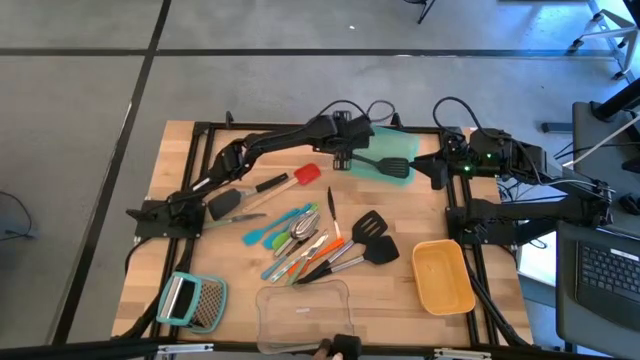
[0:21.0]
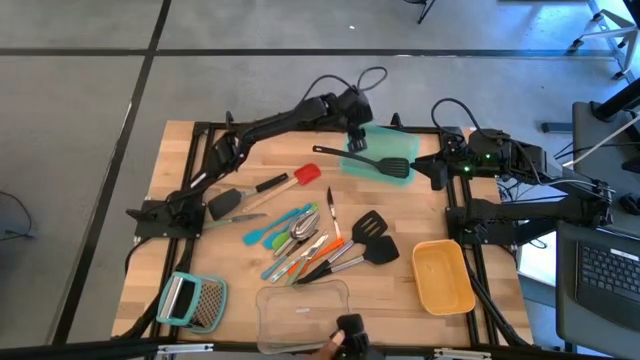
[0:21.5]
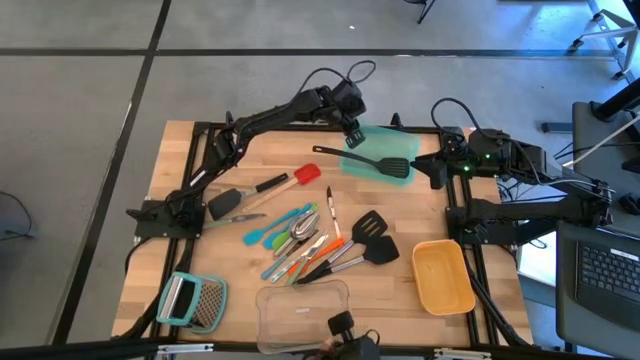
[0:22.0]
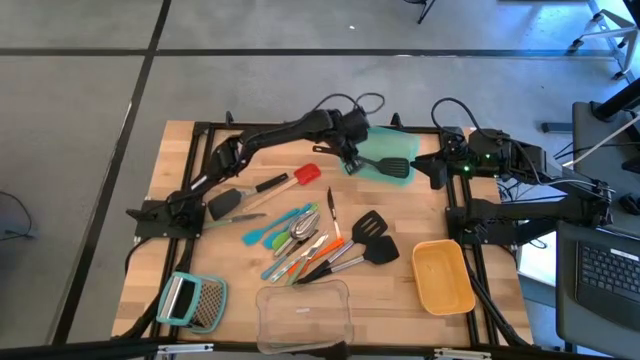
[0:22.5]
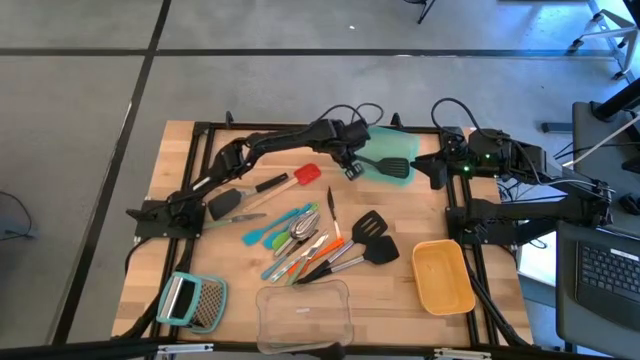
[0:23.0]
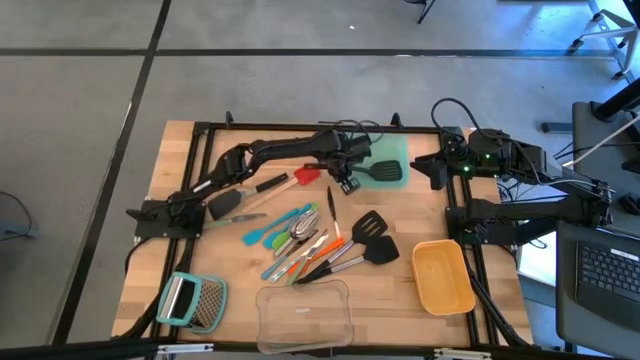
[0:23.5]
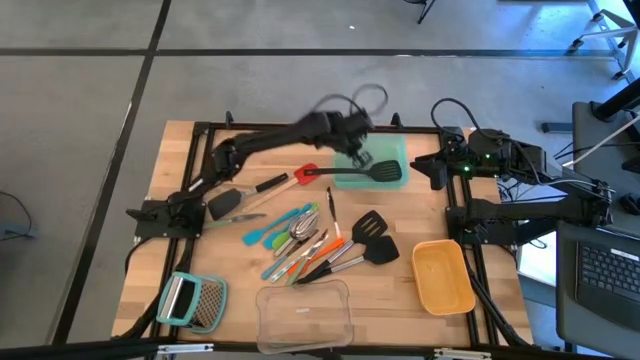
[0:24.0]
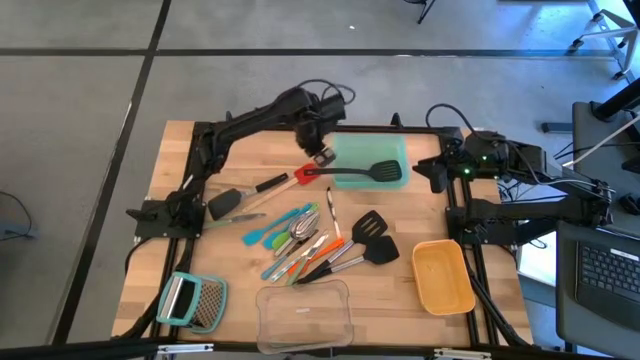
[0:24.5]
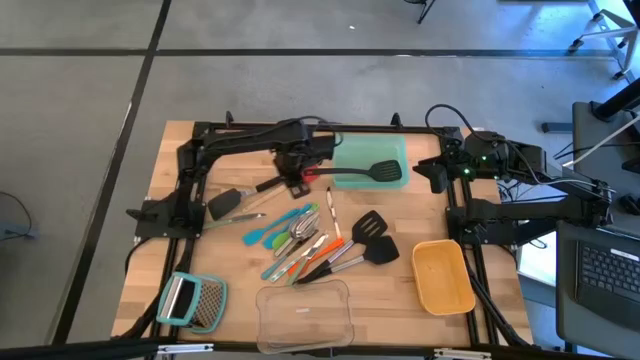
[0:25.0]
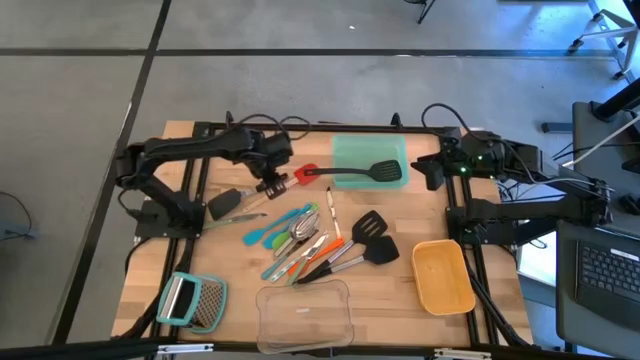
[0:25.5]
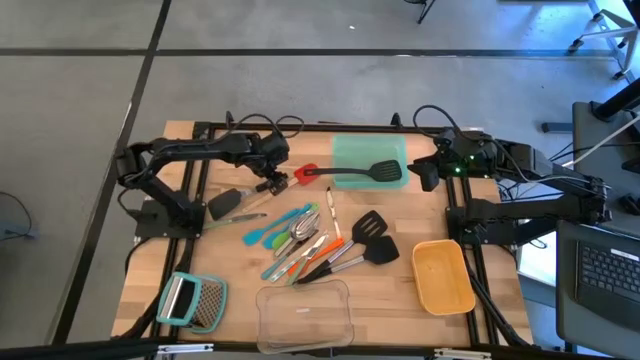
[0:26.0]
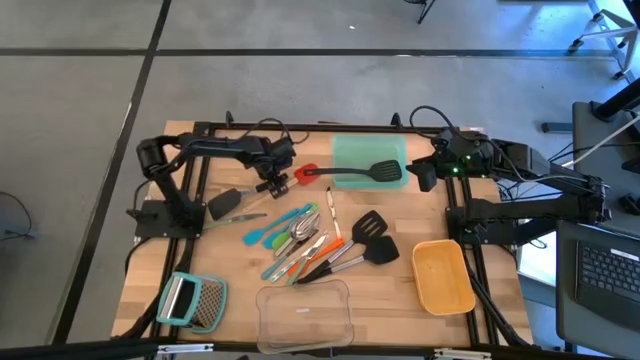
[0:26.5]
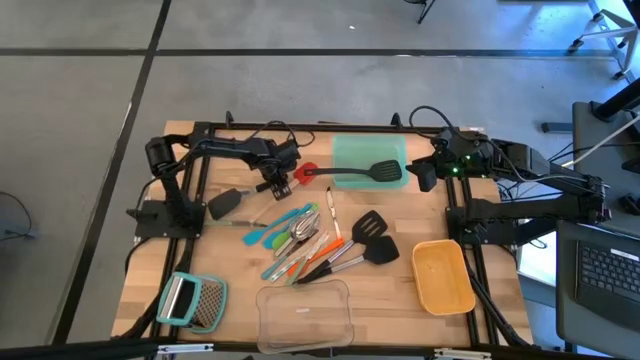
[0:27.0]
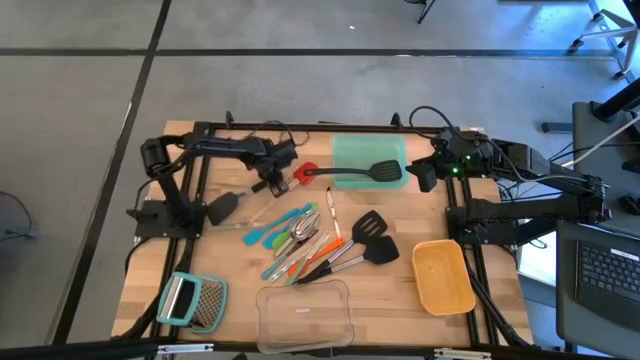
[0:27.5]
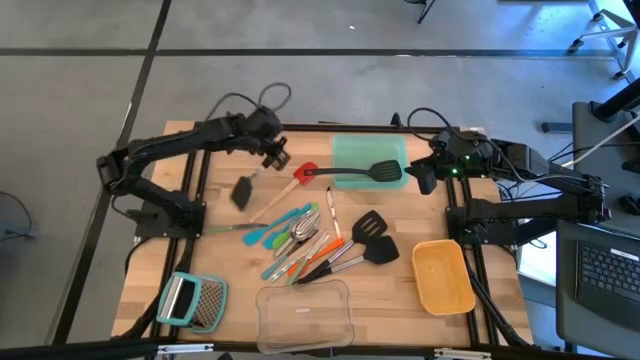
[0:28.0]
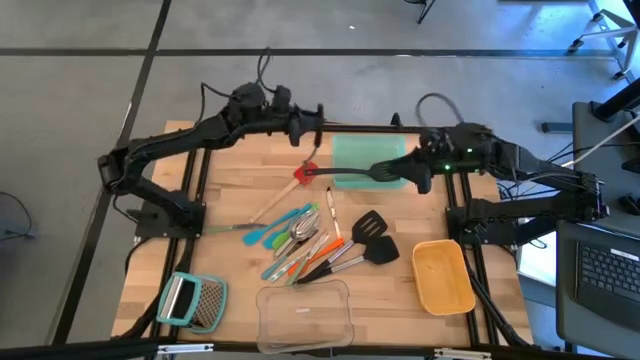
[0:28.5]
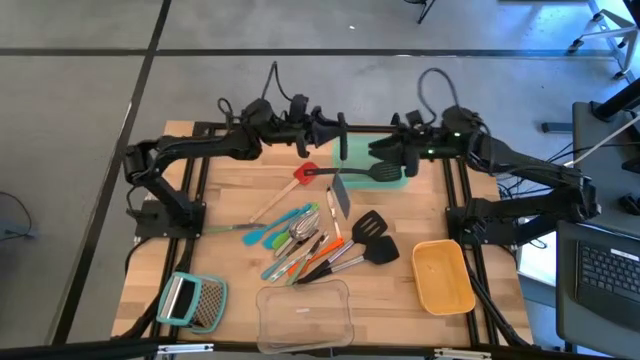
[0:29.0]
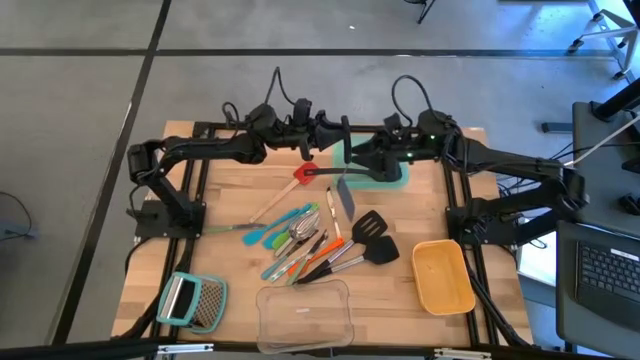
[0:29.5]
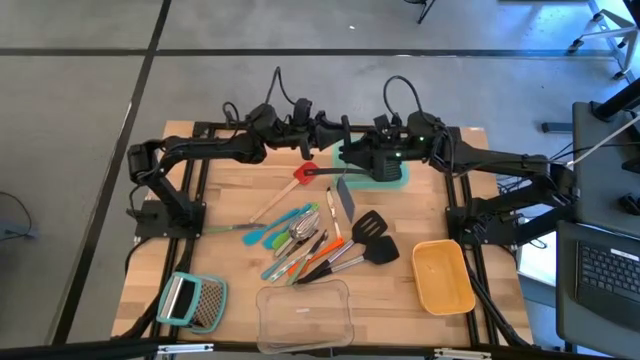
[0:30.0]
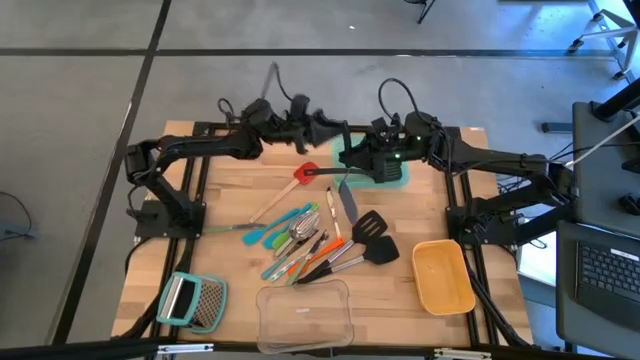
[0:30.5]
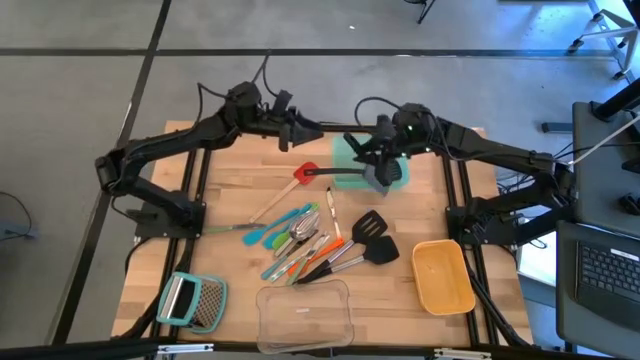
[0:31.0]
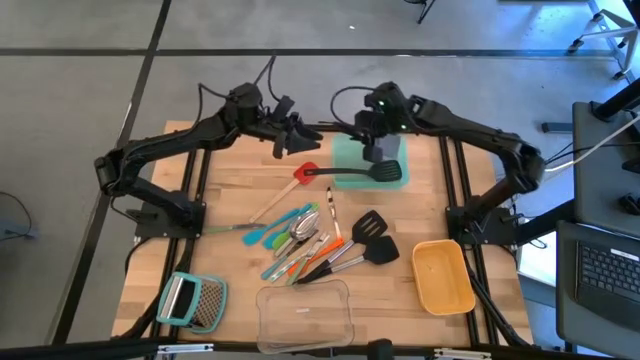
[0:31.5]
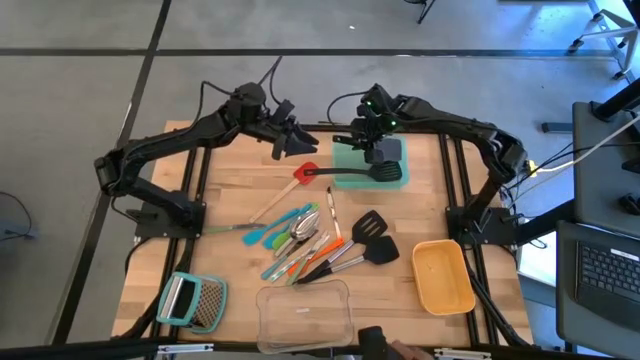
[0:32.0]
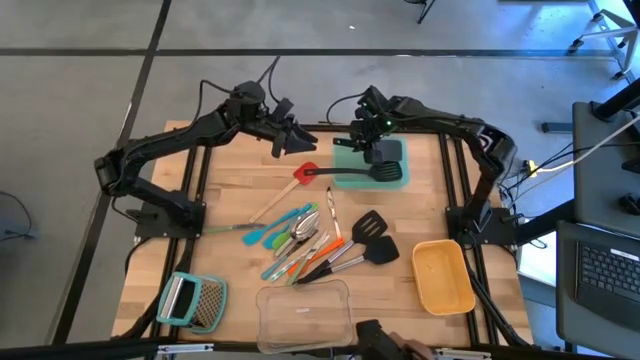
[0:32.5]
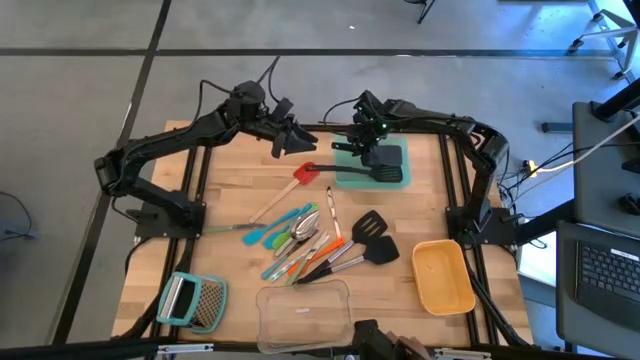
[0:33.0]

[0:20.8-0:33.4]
Task: Pick & Place Kitchen Items
Put the black spatula into the green bin

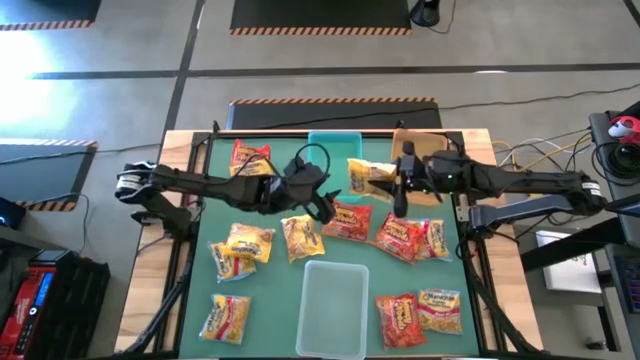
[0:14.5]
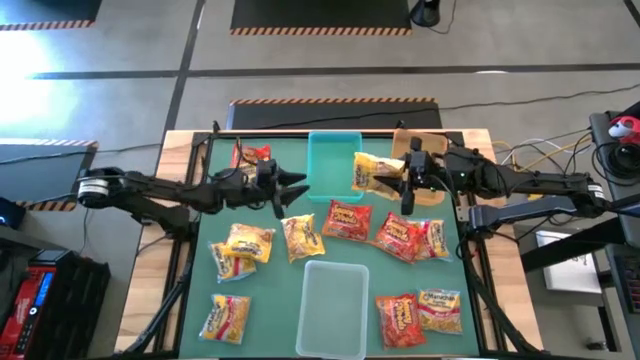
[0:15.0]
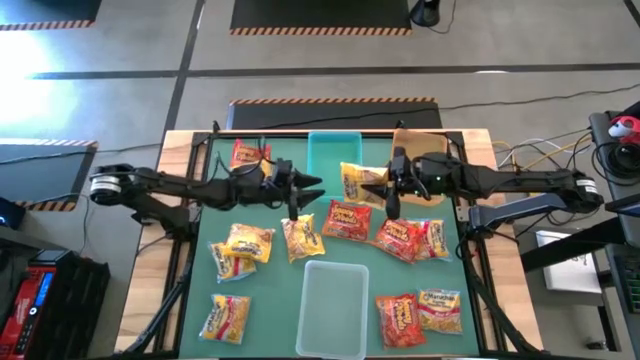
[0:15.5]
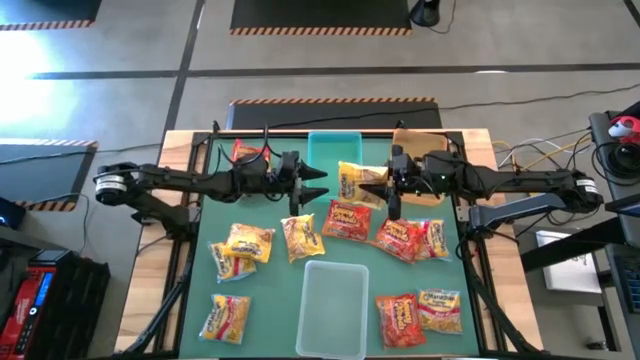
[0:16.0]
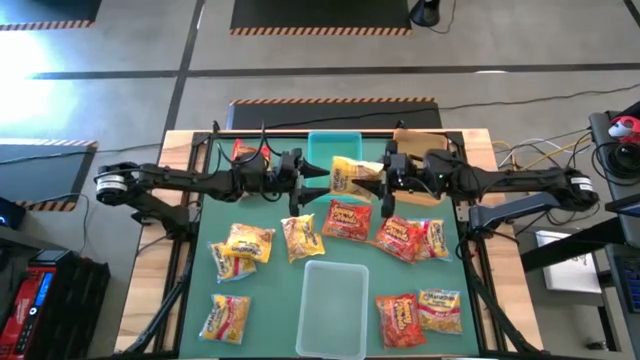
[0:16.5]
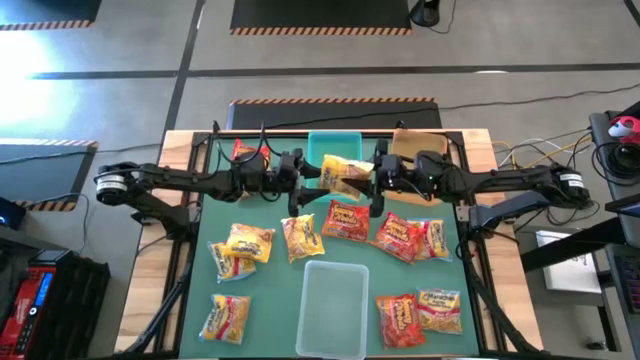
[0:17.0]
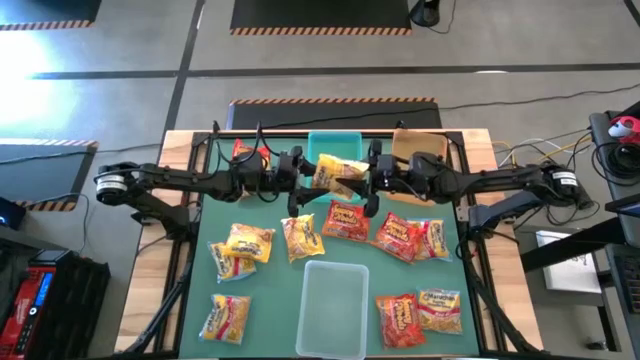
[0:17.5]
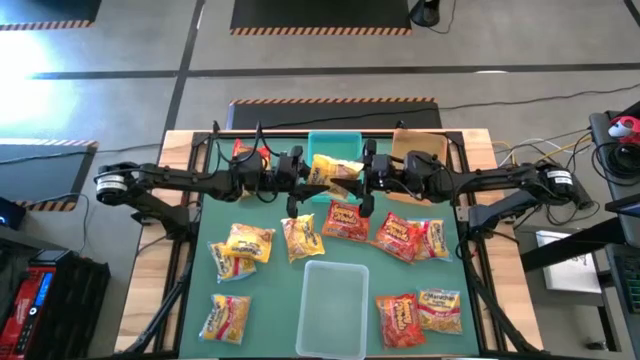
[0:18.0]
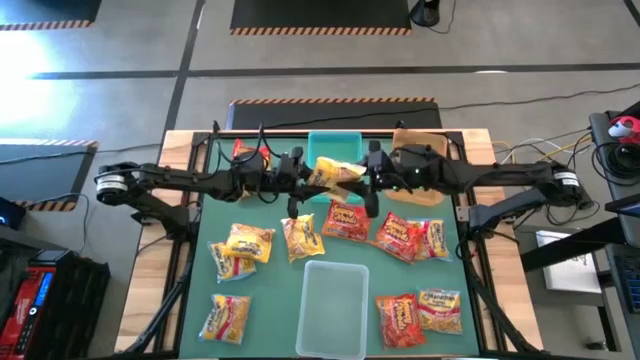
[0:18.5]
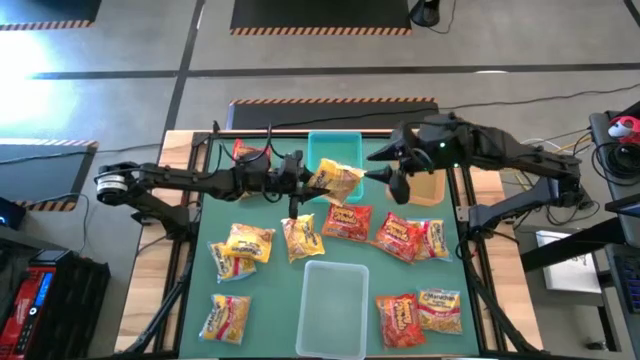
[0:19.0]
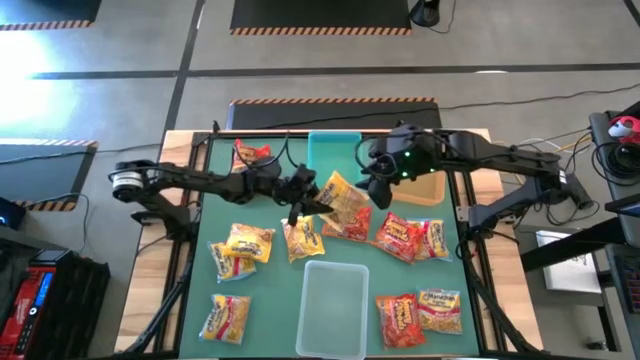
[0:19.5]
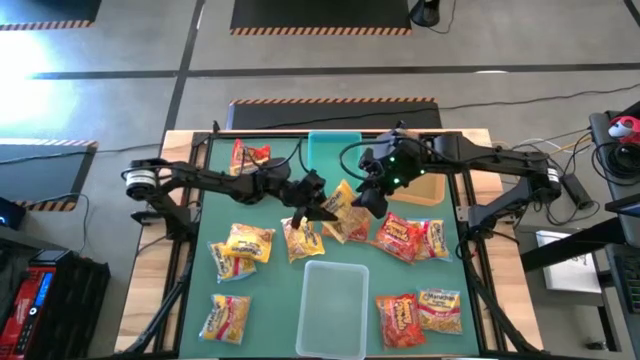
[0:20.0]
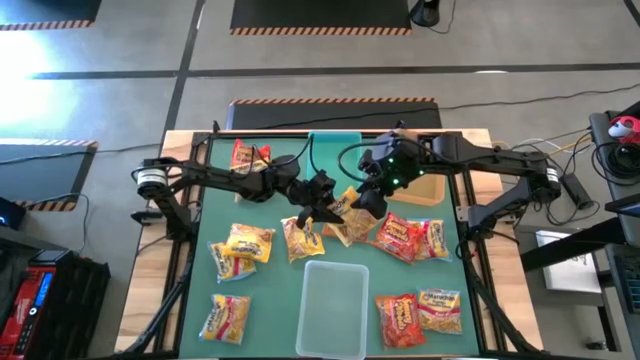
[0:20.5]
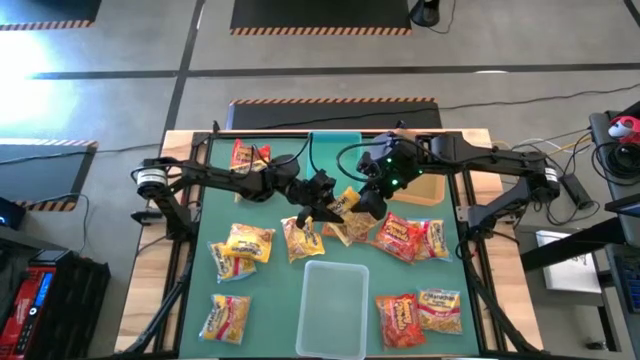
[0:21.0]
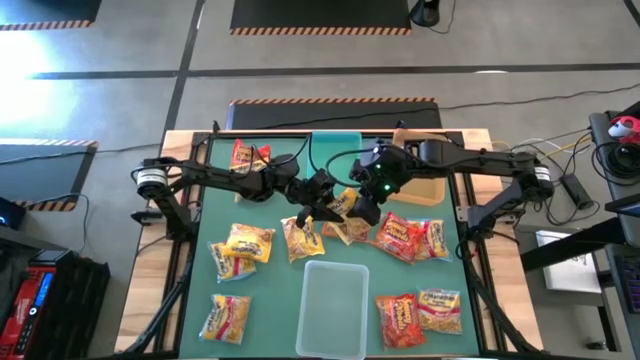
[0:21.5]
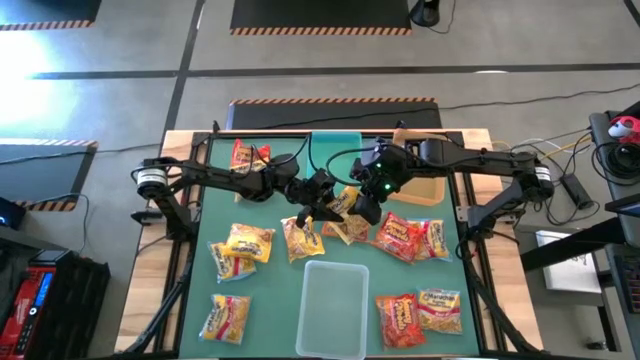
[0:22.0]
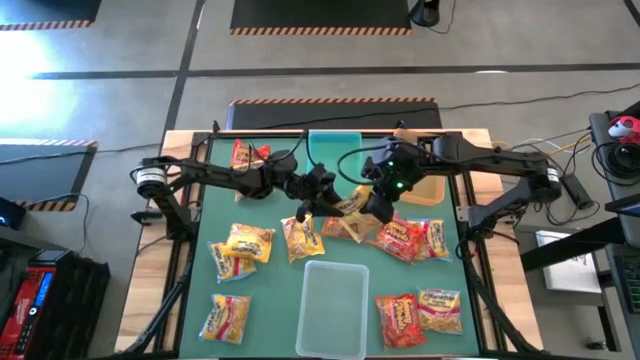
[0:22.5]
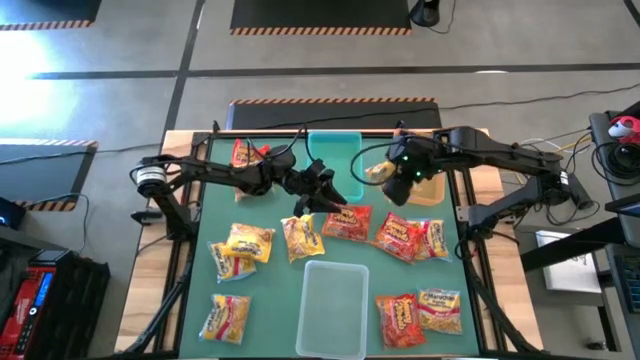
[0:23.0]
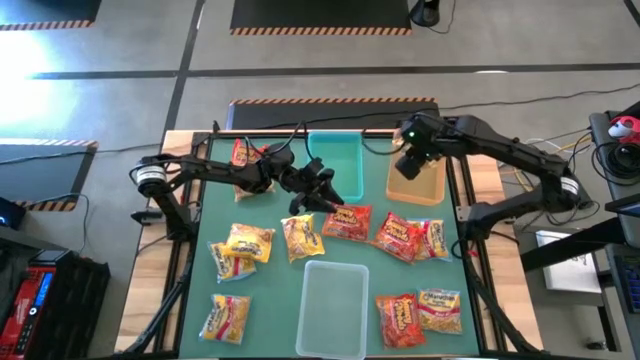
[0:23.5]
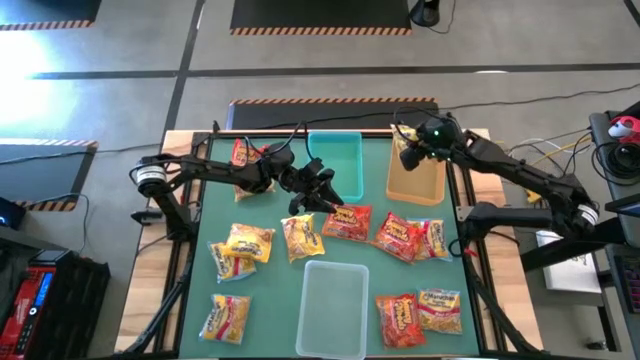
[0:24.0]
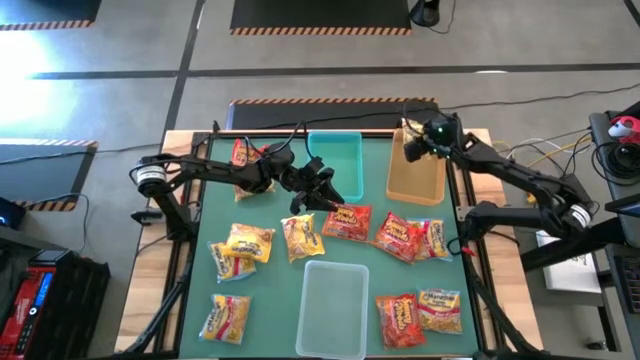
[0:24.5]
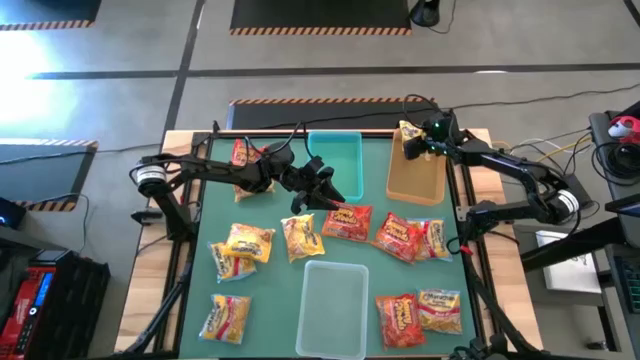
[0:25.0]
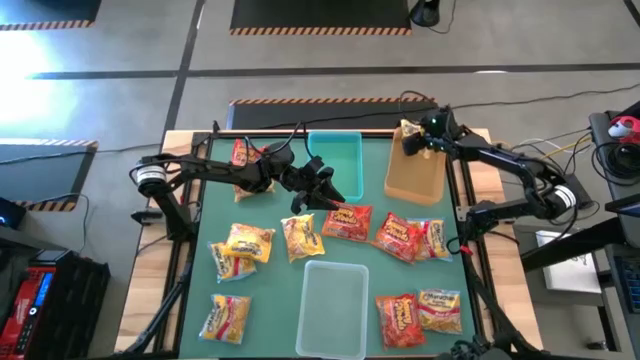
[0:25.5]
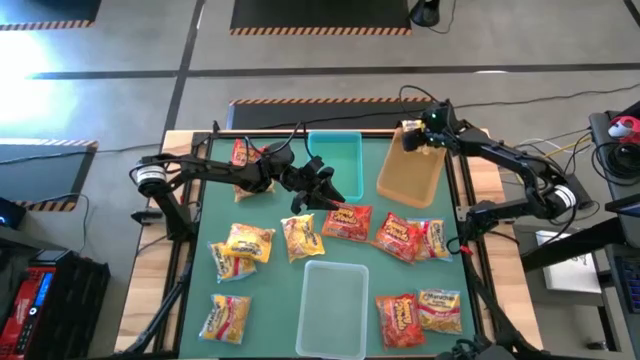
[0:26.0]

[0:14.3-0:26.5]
Task: Sort Maruchan noodles
Put the yellow noodle pack into the orange bin
